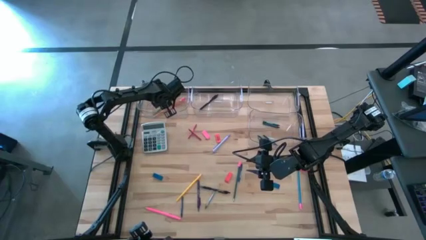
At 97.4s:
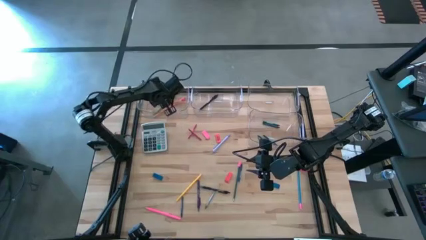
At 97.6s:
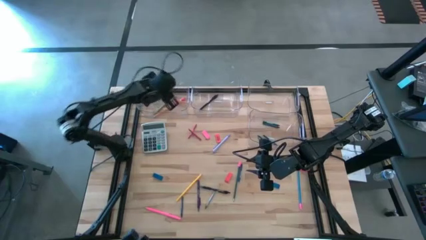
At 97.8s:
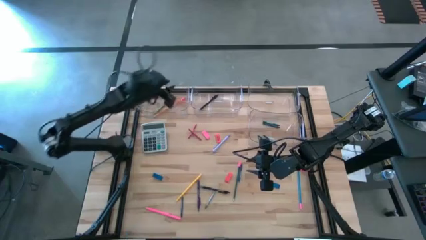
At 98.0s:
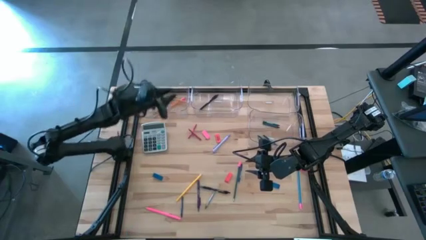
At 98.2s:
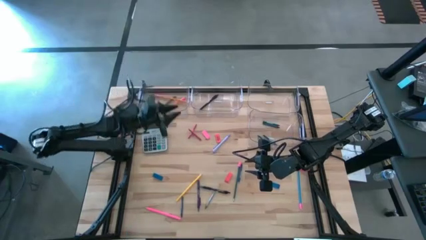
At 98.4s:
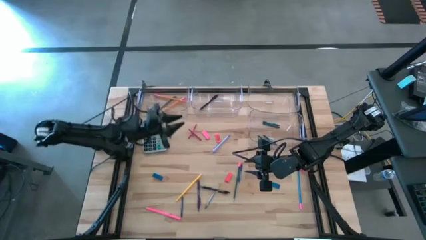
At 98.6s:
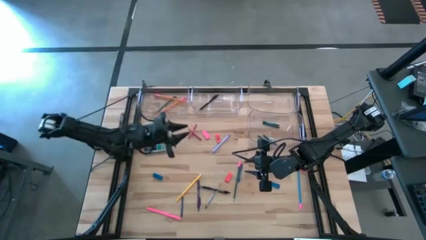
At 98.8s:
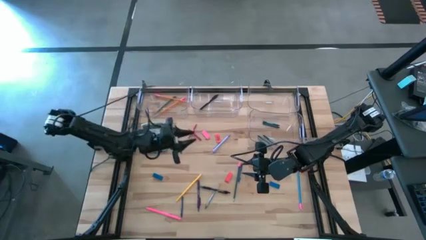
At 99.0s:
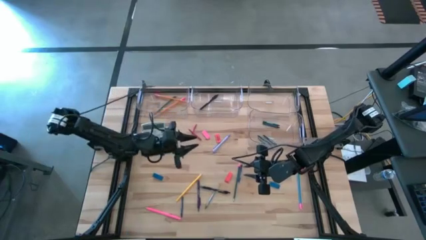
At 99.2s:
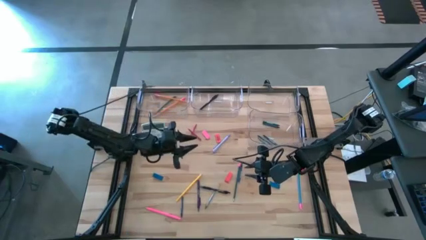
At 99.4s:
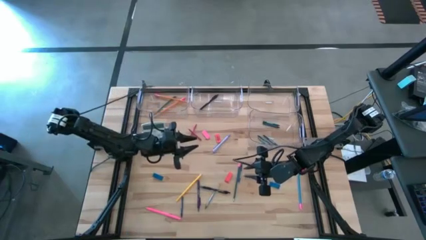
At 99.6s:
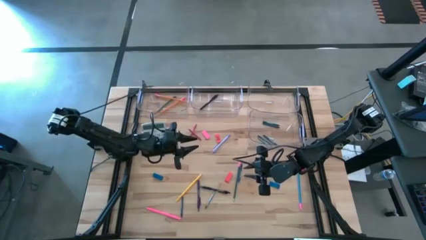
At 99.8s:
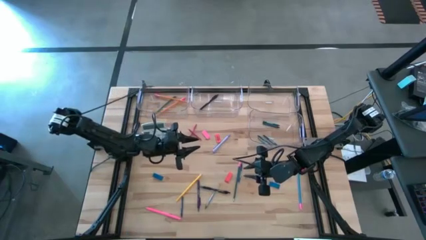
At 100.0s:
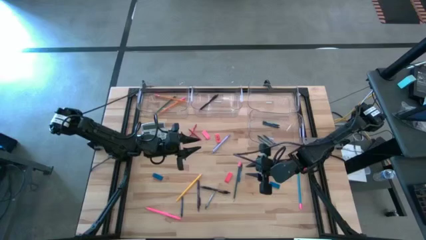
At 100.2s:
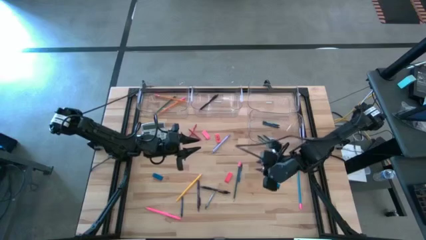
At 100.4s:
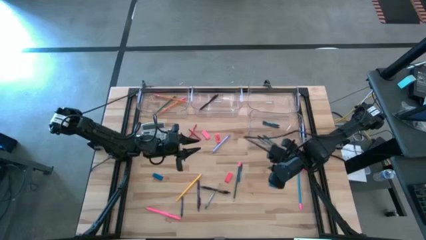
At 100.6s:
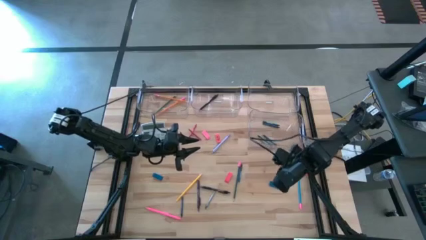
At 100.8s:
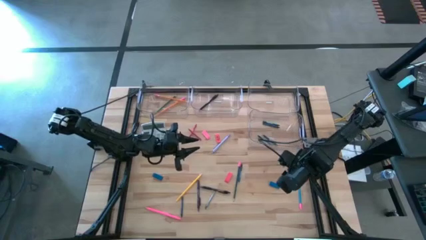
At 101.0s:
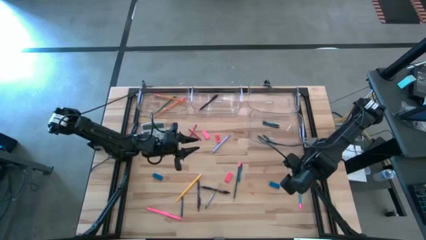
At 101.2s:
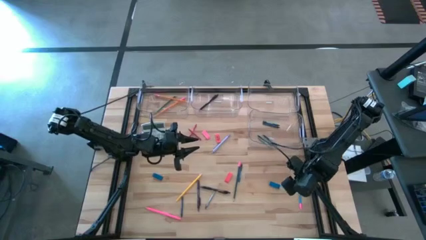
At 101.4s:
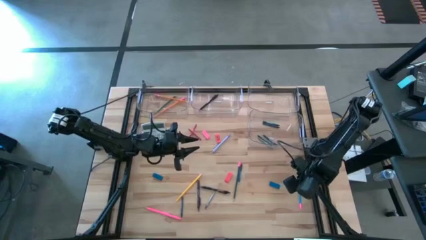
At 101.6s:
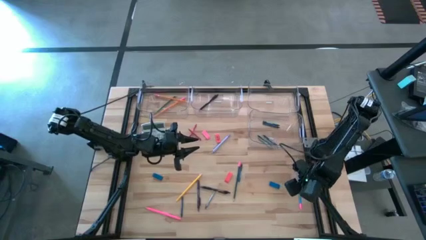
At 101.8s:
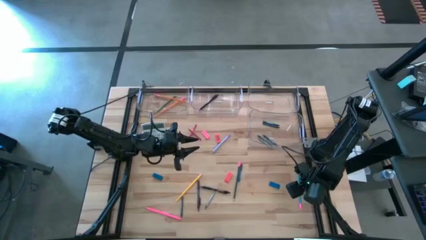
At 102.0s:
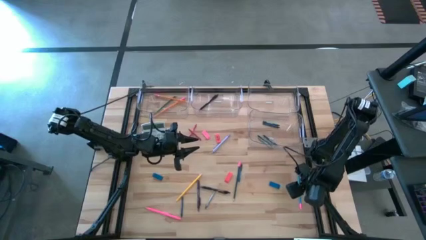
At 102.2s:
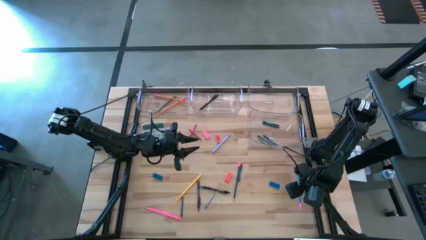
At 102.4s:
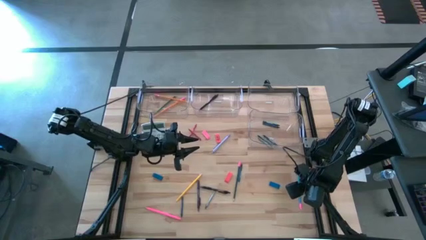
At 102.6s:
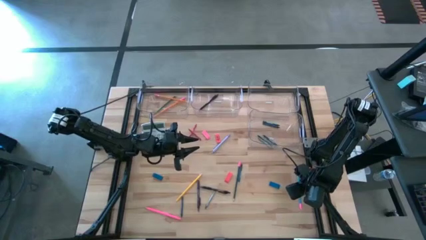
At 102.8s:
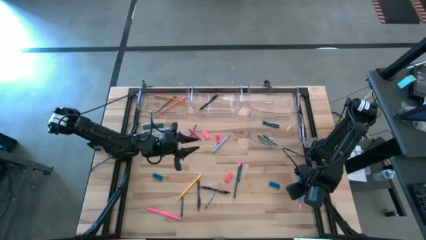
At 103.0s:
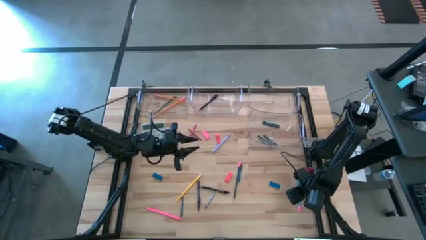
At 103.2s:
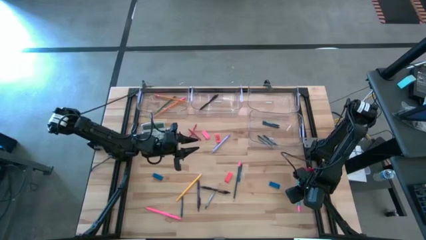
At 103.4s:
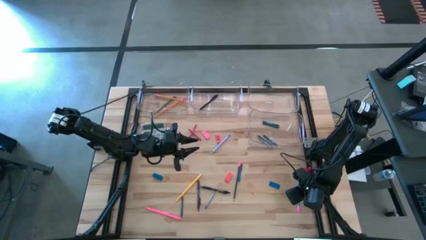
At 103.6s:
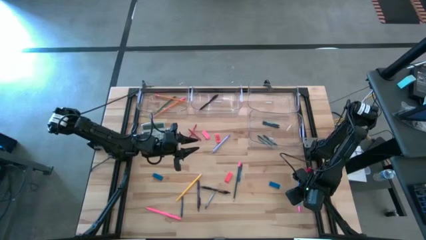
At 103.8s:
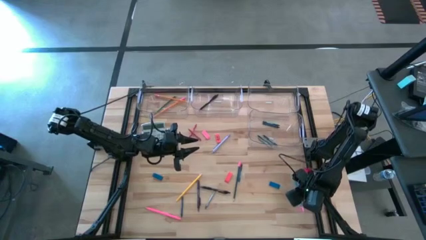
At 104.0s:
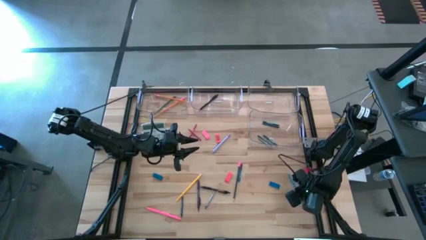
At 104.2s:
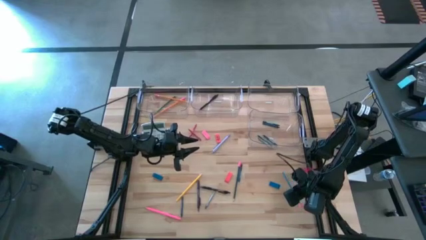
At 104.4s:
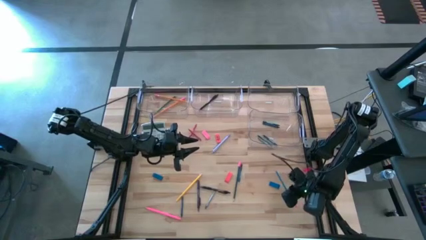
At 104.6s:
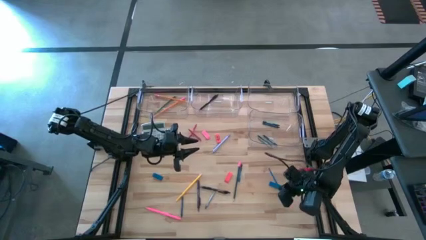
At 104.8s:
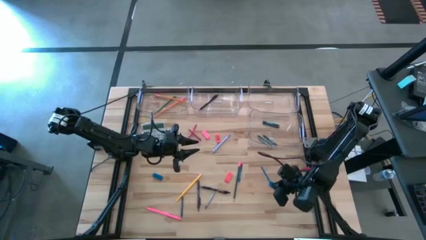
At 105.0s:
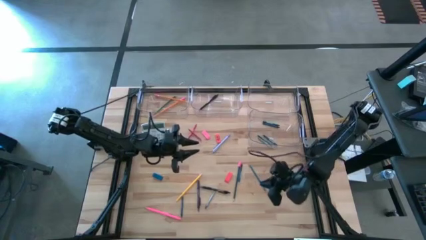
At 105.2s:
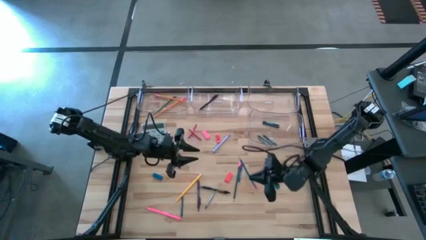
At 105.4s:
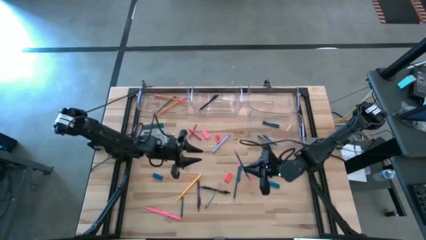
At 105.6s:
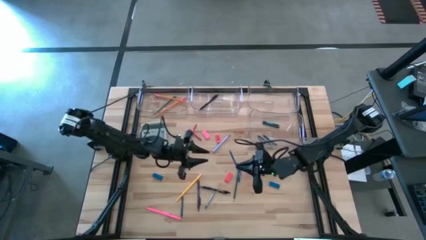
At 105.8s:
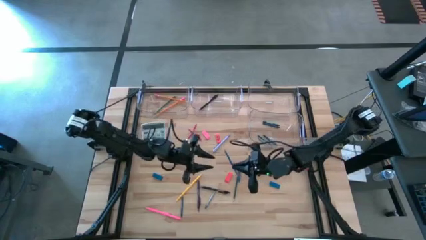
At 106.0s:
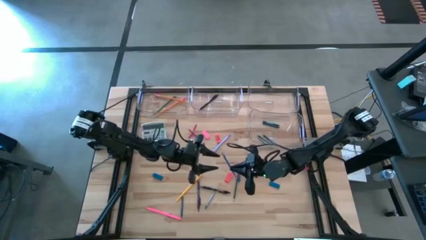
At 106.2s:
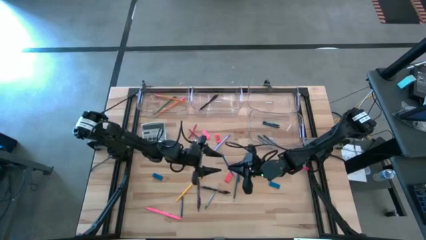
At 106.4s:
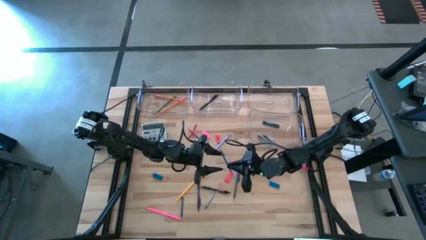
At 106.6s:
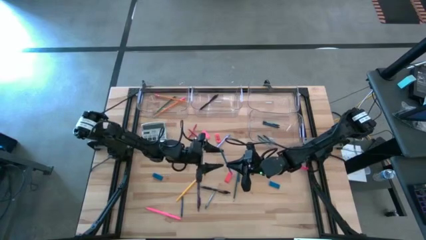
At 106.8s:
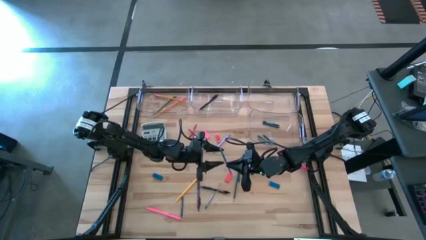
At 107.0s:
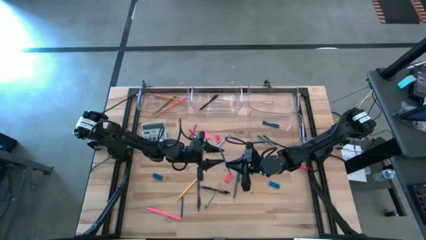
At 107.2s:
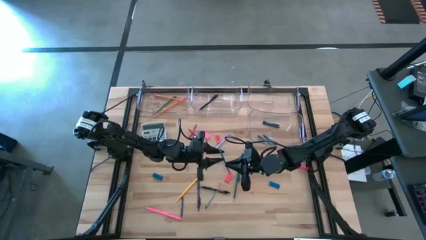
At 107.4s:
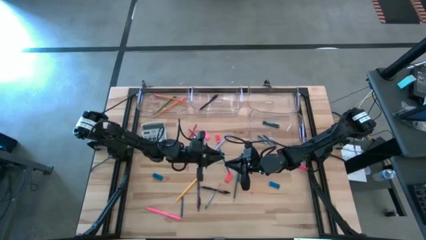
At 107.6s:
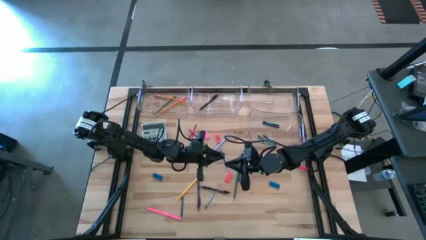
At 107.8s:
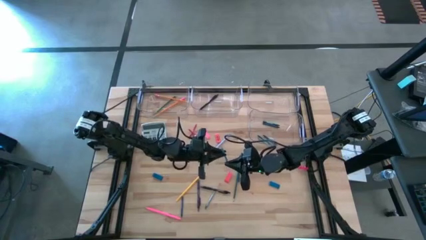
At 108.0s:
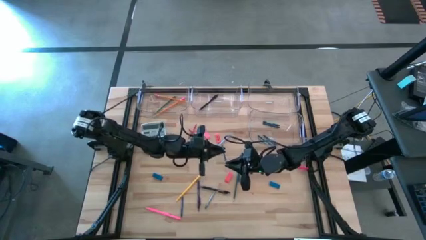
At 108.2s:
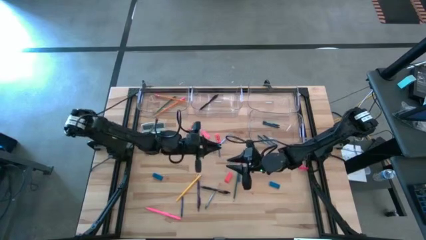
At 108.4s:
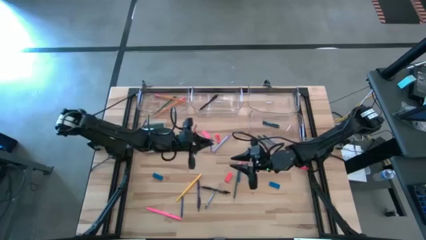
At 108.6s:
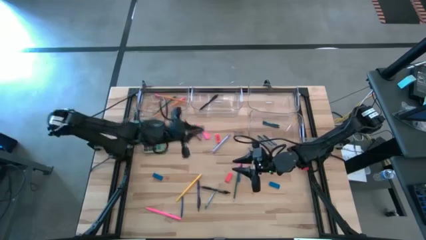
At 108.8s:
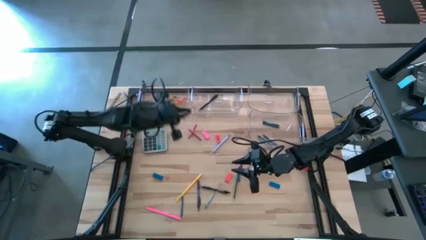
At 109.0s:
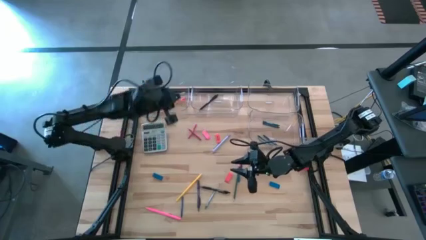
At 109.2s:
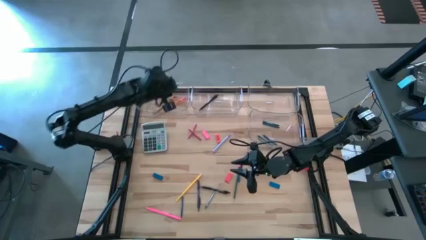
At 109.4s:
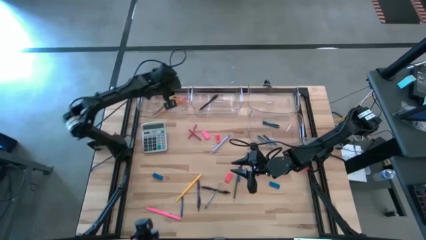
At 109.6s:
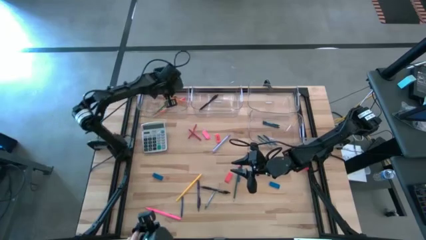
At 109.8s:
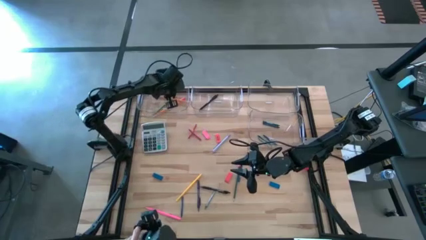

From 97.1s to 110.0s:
Task: Sort crayons/erasers/pens/pencils in bins
Put the blue pencil into the top left transparent bin

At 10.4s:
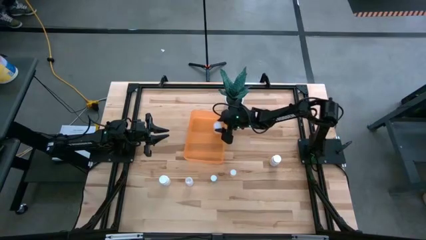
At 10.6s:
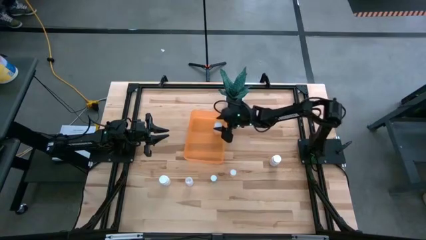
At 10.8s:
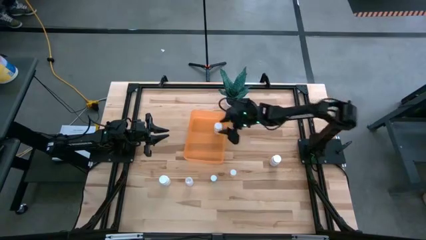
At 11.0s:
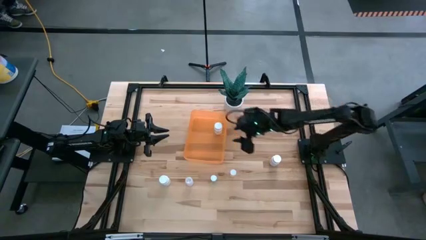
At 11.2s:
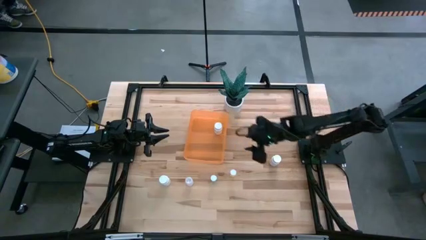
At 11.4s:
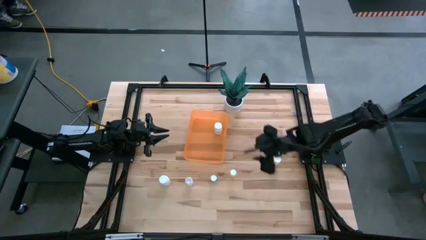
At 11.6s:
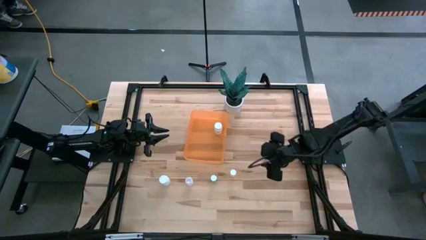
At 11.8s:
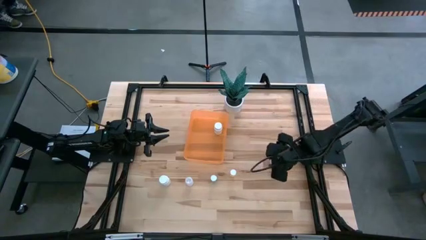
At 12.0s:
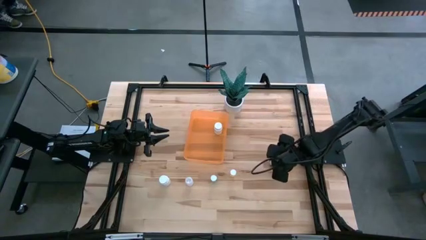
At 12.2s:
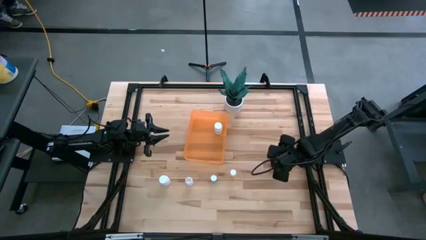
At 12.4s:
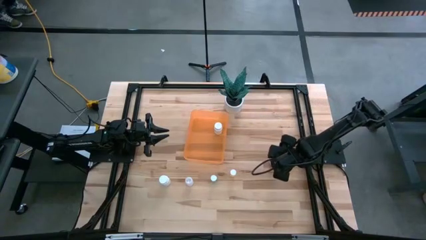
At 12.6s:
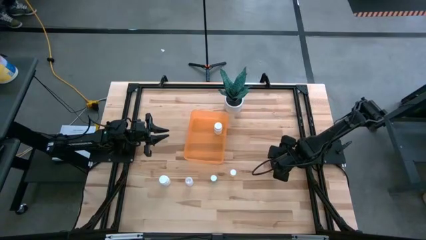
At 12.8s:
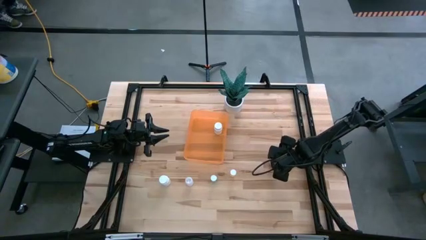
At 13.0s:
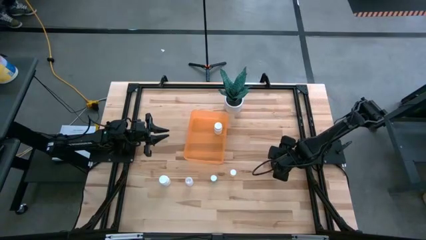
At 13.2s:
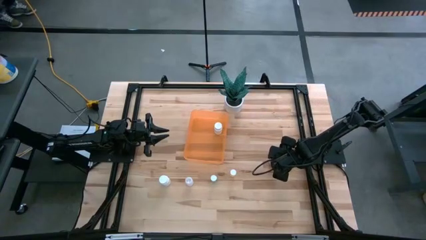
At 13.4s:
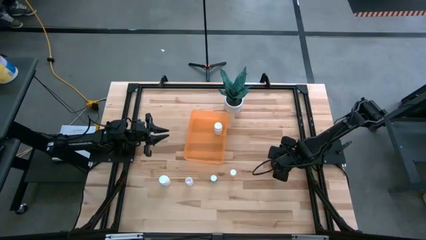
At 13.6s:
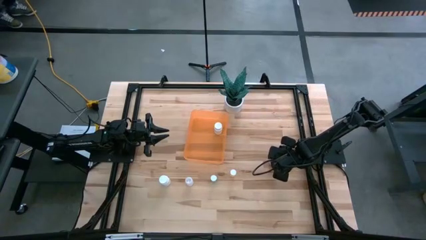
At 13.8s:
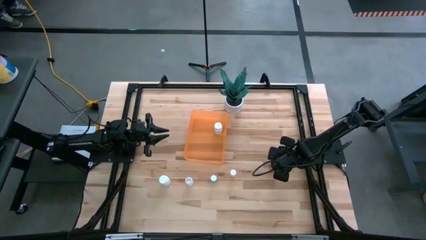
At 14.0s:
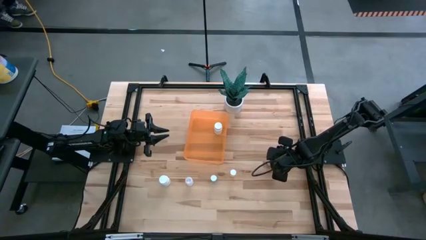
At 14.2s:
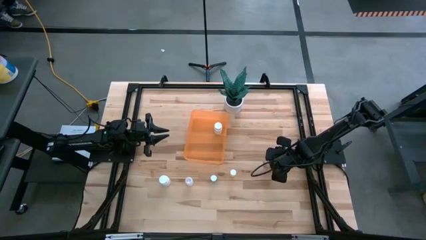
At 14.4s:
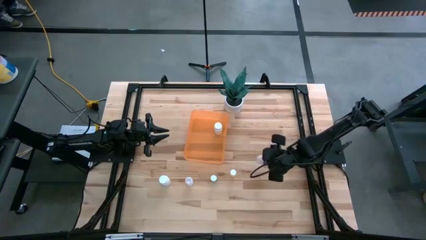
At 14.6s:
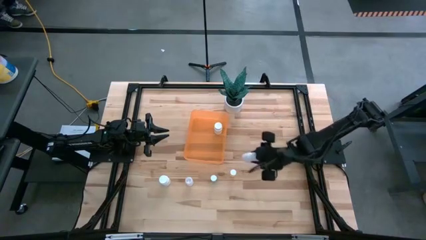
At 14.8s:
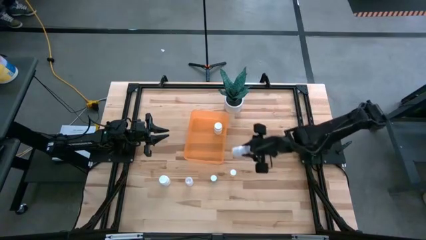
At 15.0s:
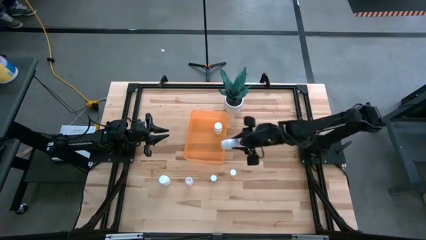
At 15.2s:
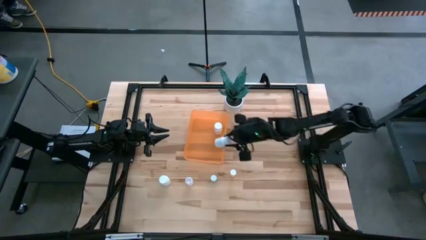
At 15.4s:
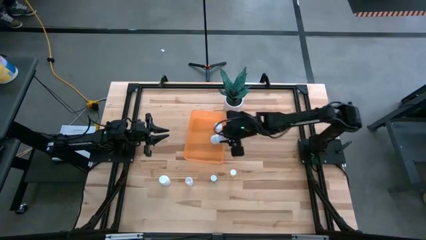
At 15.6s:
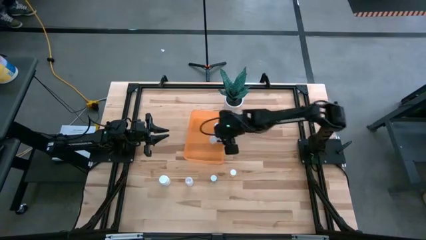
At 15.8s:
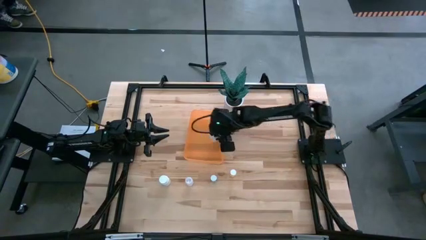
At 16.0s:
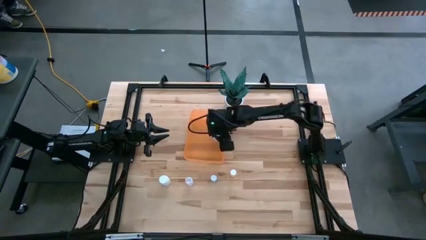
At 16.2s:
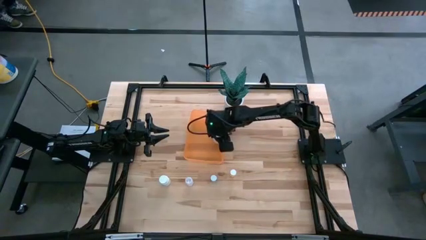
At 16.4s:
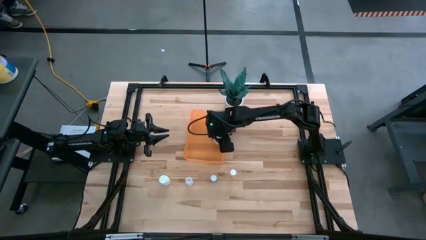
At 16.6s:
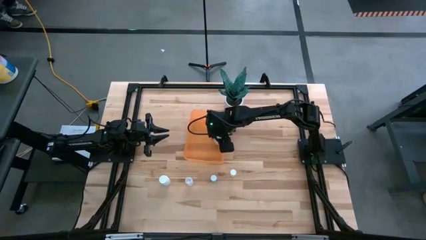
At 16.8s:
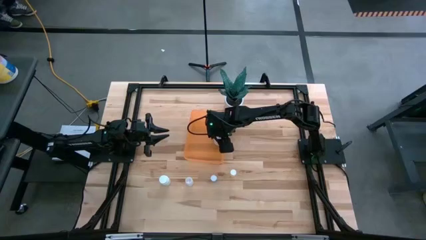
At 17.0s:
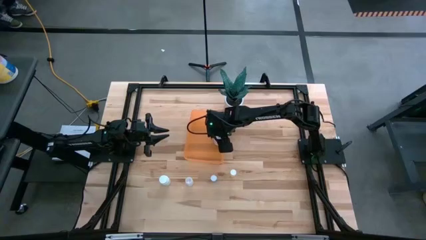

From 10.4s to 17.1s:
Task: Pick and place pill bottles into a basket
Put the right white pill bottle into the orange bin
